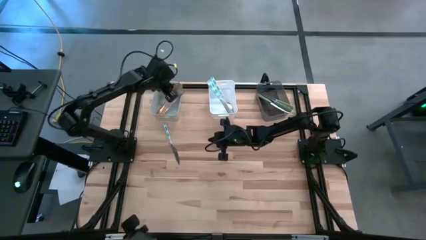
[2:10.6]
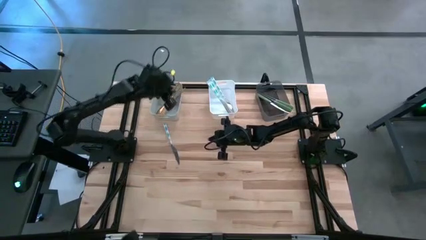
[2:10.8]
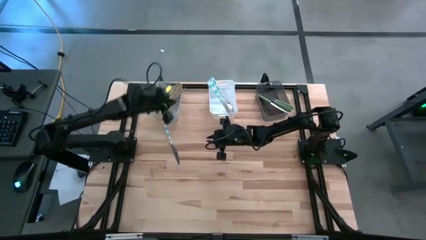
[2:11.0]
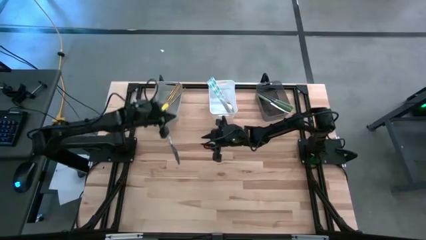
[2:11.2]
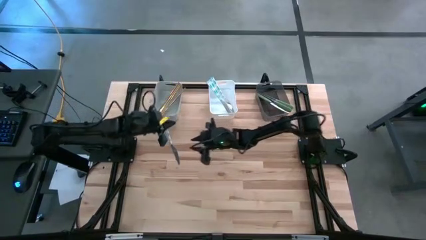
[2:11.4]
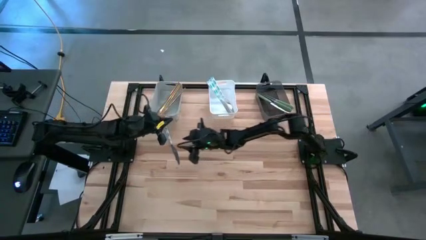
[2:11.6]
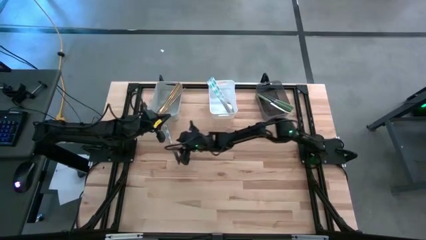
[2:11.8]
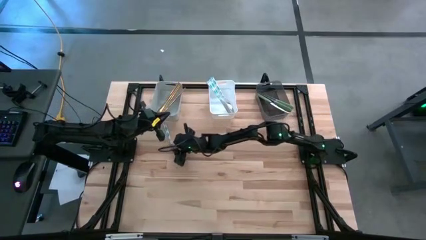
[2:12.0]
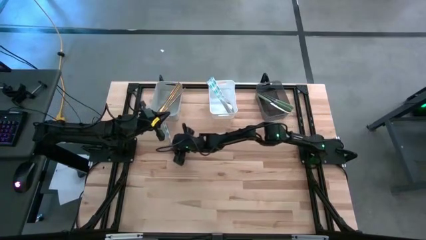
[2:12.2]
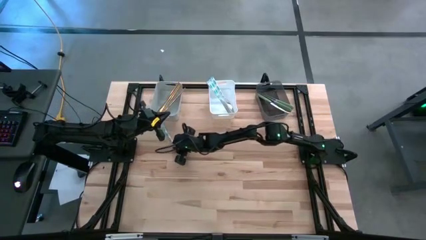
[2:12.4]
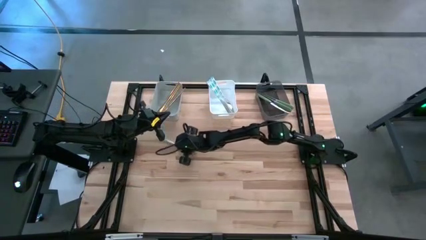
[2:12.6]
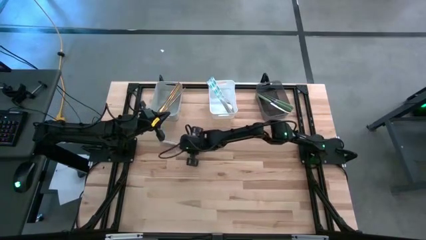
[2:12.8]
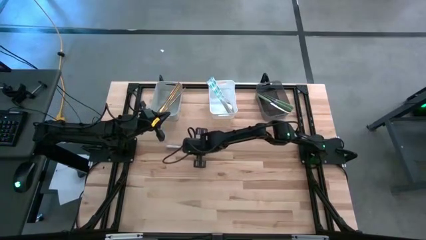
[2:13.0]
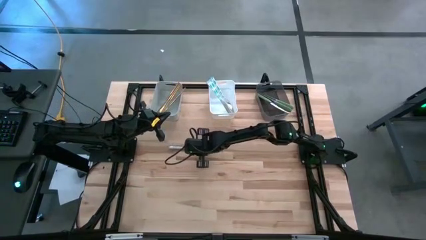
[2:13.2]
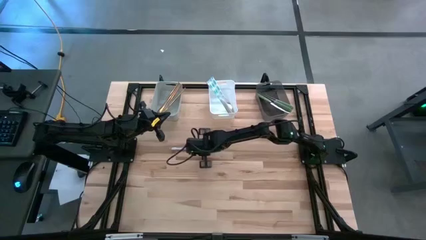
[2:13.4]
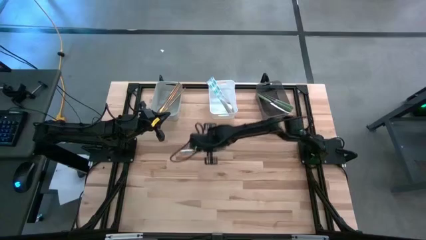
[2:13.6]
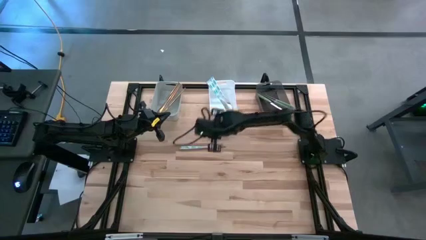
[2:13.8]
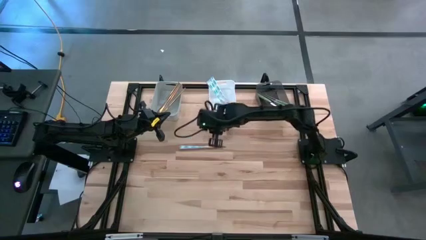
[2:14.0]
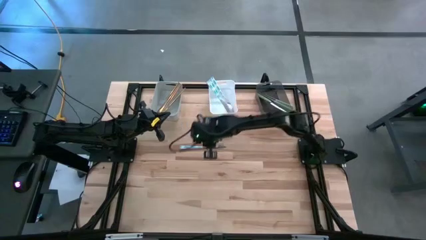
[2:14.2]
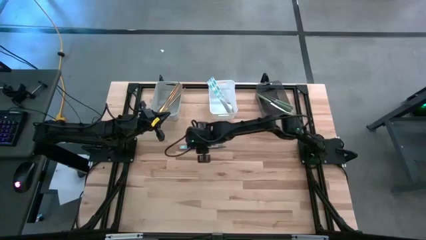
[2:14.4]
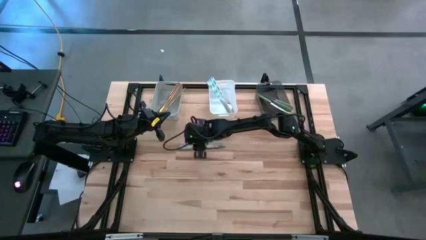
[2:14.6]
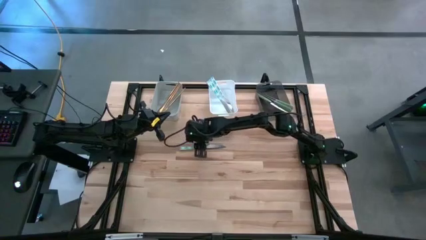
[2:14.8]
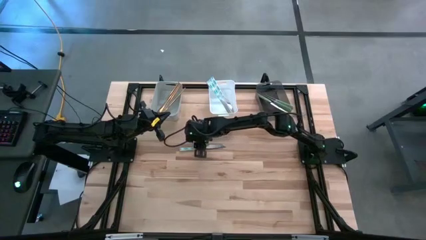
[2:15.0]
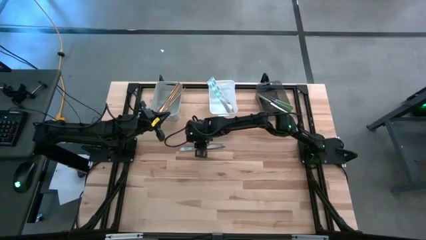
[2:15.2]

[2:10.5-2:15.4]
Task: Sort silverware by color (type)
Put the blue table knife into the white bin

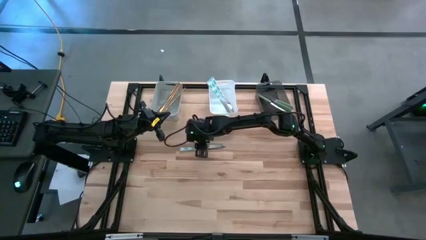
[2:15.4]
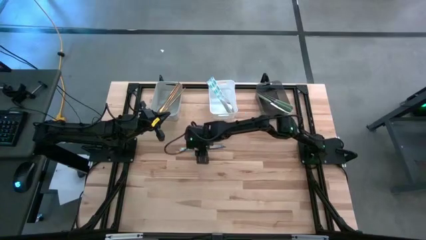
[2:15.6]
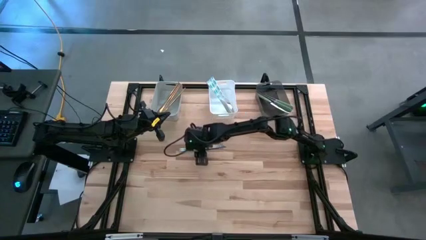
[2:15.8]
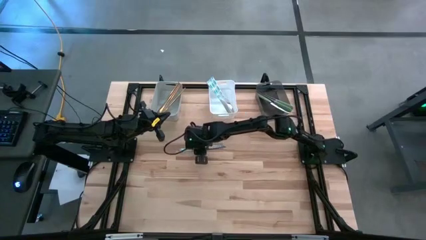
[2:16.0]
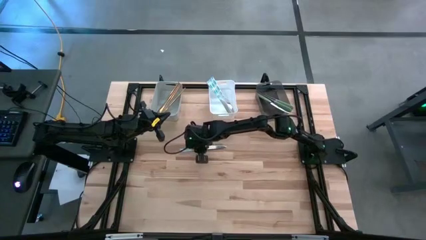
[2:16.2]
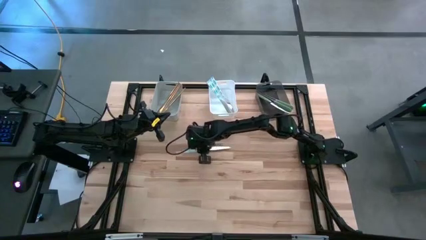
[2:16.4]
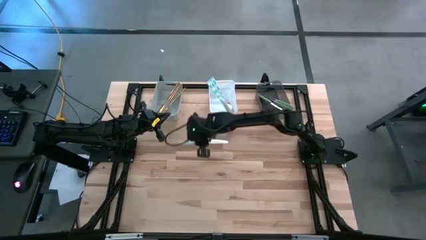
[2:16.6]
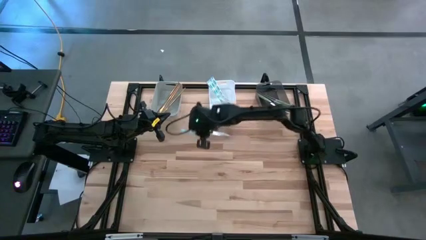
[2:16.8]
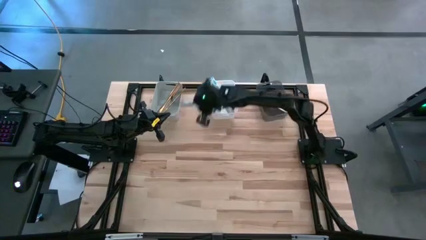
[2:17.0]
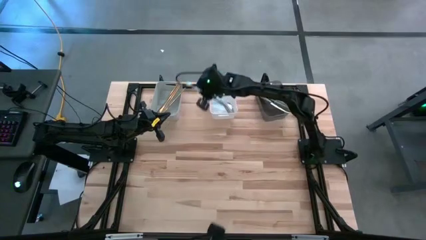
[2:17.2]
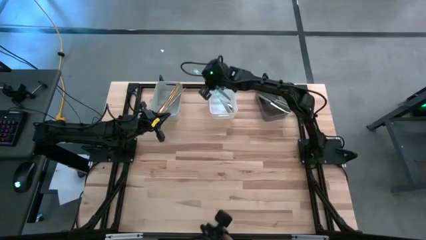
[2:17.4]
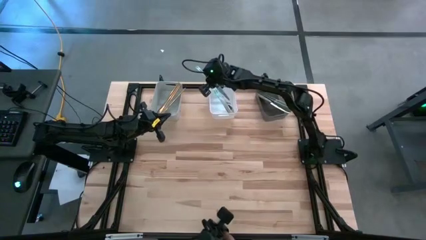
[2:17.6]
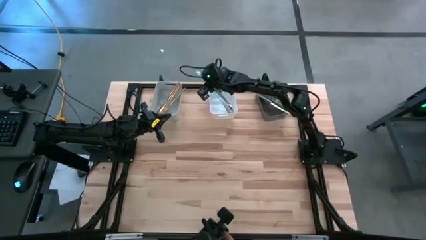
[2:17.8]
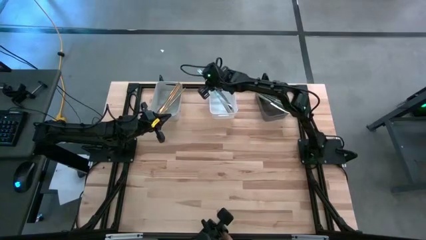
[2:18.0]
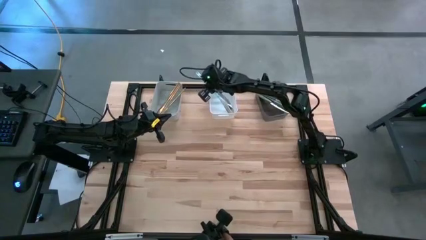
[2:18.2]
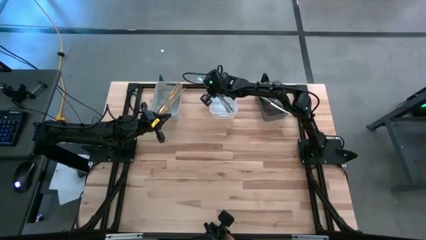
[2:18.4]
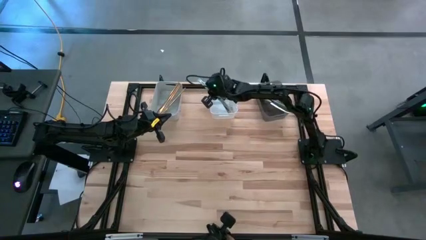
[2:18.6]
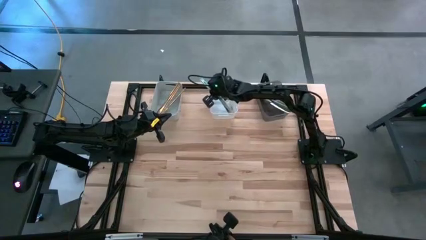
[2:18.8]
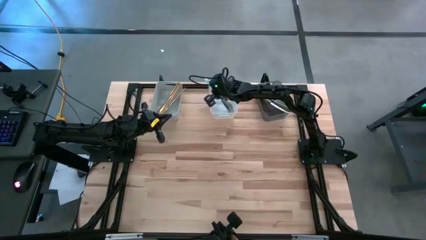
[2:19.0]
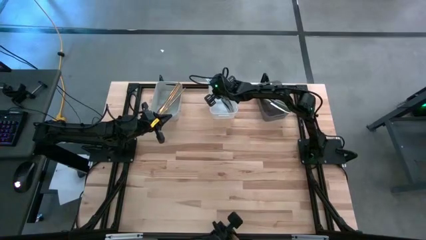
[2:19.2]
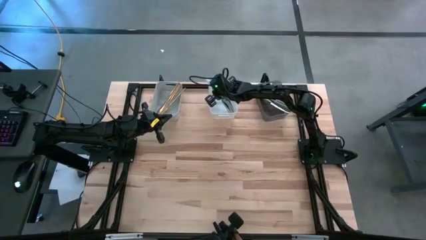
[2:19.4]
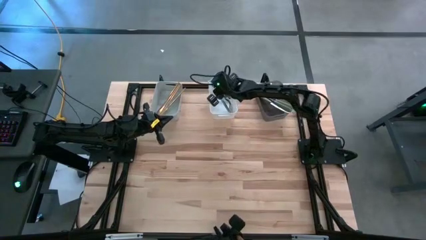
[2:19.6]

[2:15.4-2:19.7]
Put the blue table knife into the white bin

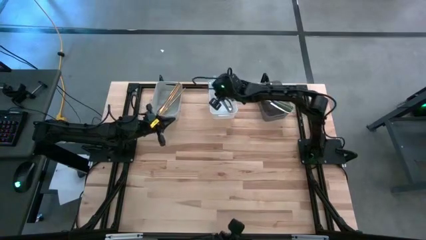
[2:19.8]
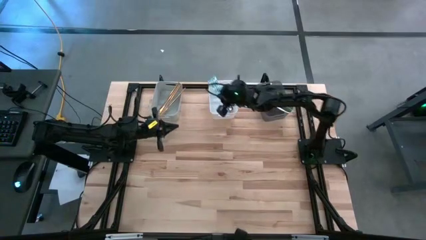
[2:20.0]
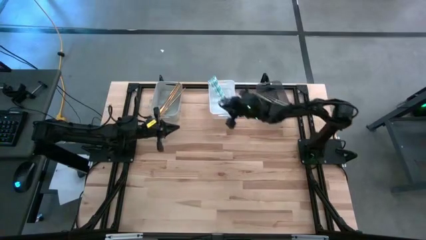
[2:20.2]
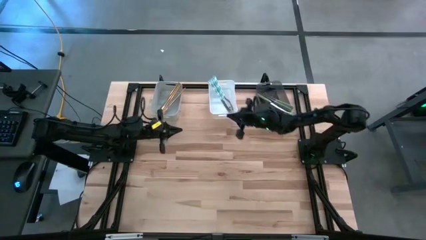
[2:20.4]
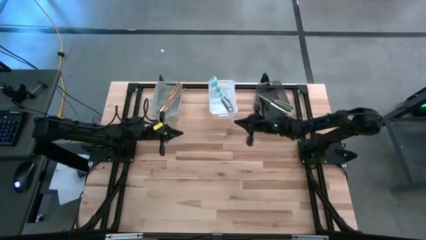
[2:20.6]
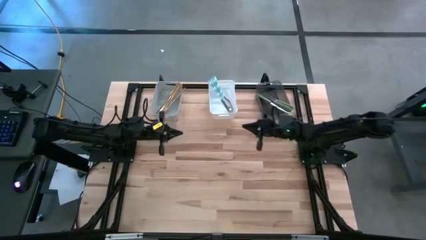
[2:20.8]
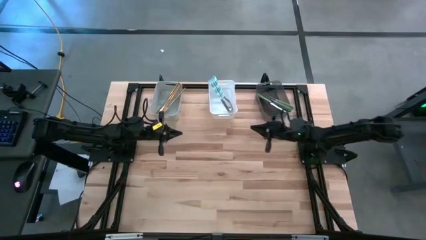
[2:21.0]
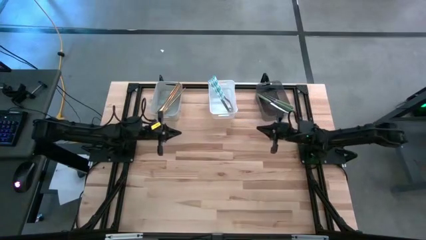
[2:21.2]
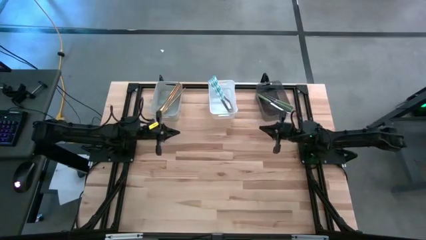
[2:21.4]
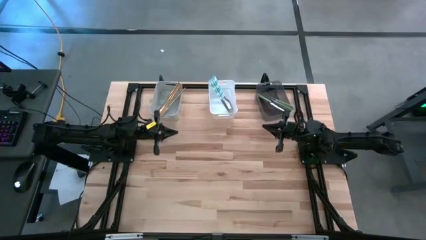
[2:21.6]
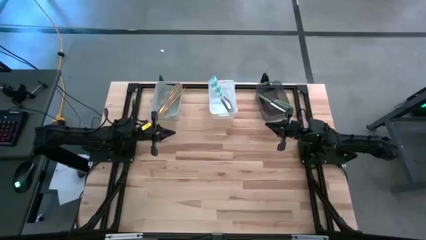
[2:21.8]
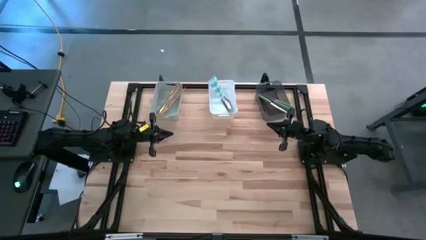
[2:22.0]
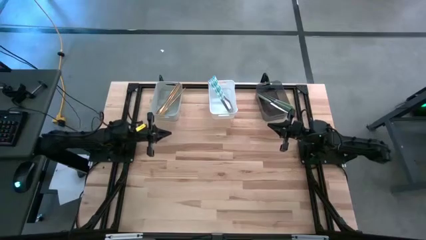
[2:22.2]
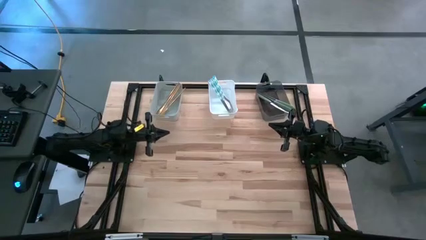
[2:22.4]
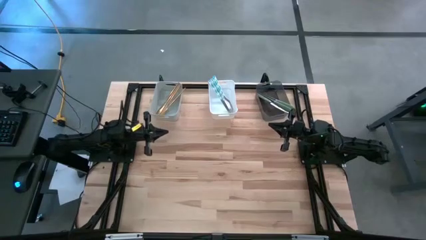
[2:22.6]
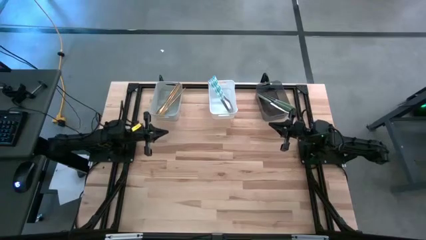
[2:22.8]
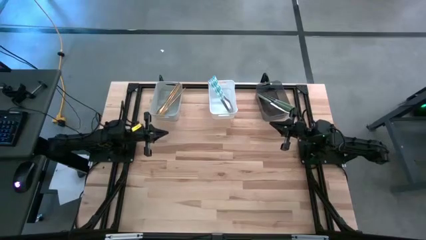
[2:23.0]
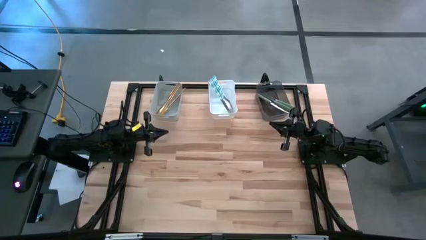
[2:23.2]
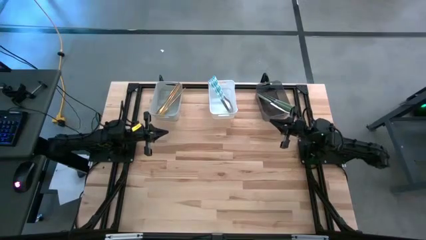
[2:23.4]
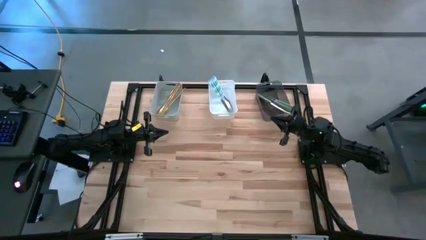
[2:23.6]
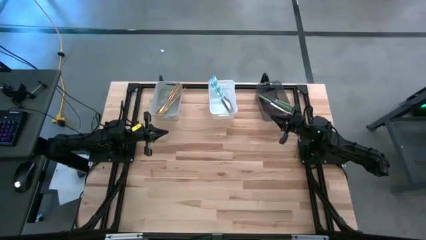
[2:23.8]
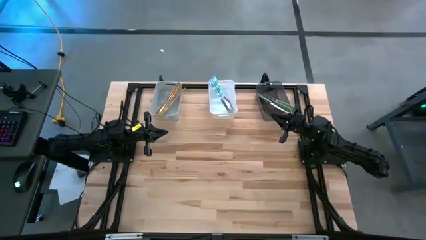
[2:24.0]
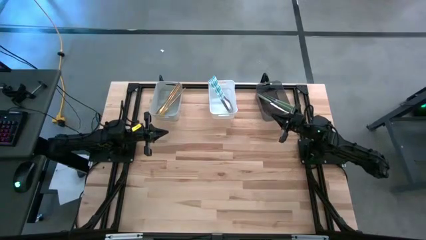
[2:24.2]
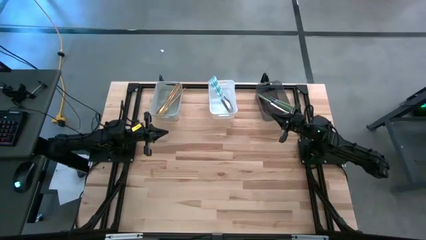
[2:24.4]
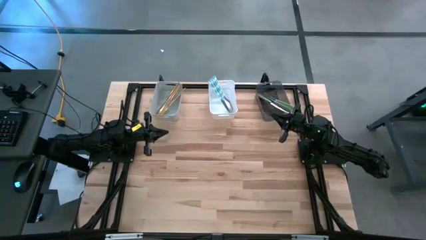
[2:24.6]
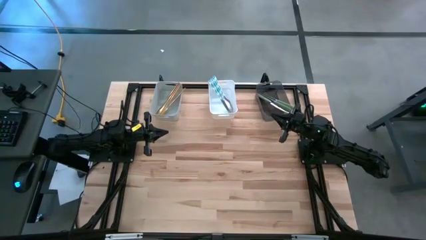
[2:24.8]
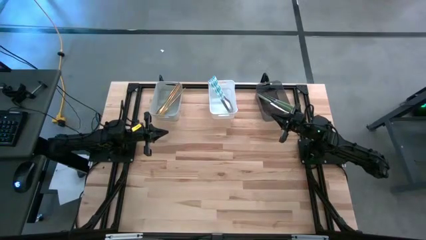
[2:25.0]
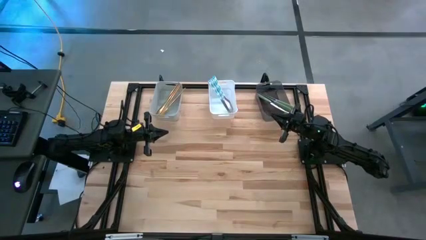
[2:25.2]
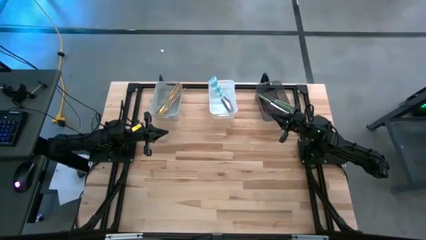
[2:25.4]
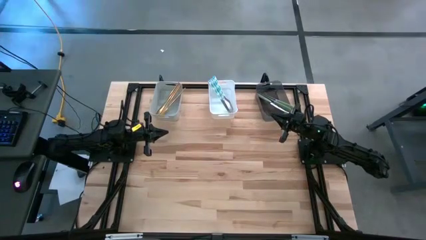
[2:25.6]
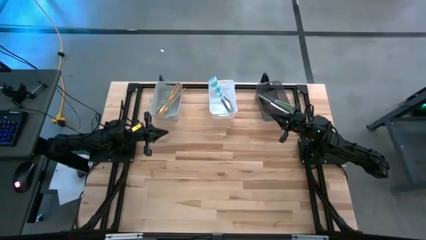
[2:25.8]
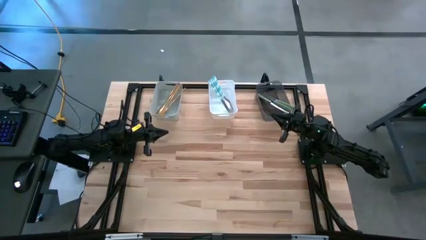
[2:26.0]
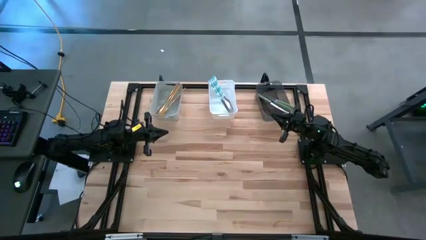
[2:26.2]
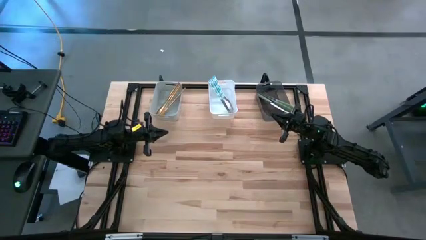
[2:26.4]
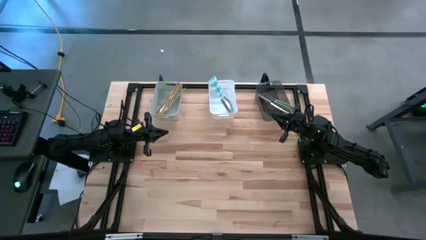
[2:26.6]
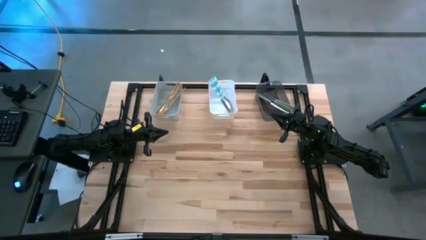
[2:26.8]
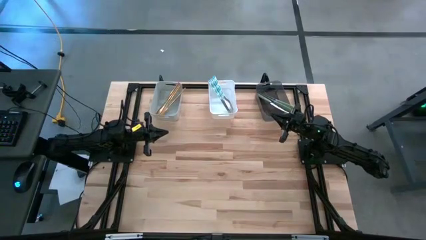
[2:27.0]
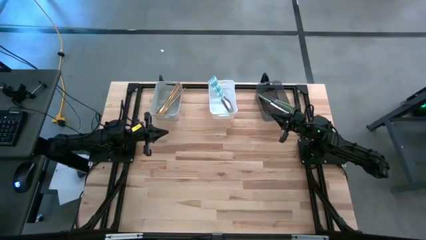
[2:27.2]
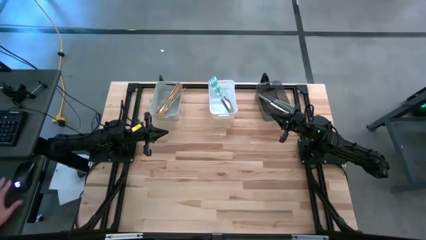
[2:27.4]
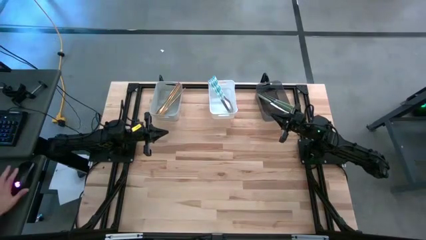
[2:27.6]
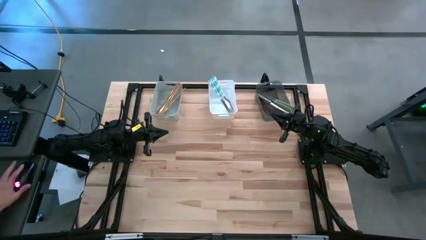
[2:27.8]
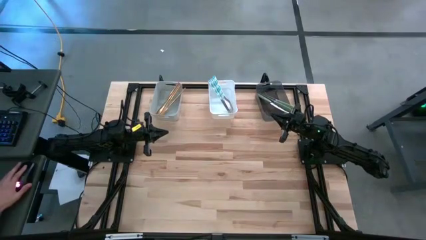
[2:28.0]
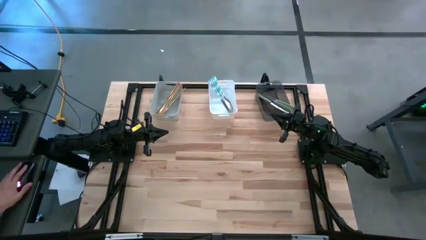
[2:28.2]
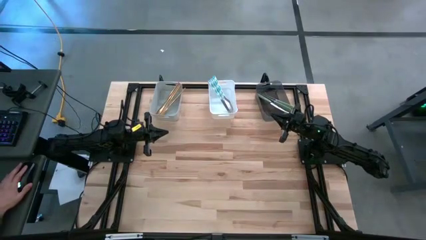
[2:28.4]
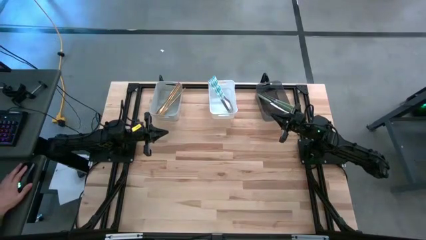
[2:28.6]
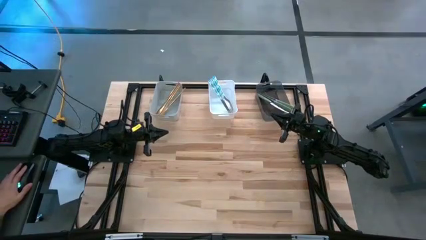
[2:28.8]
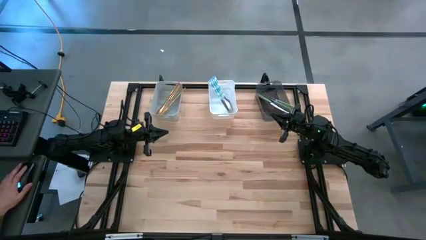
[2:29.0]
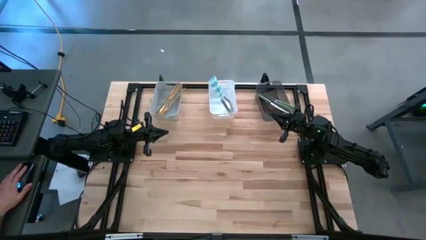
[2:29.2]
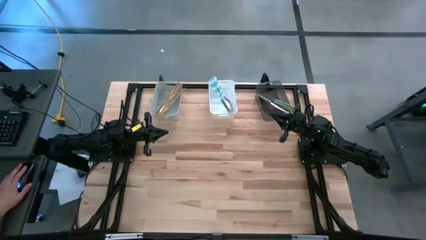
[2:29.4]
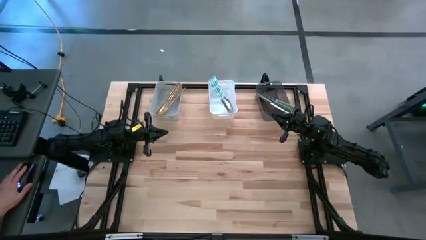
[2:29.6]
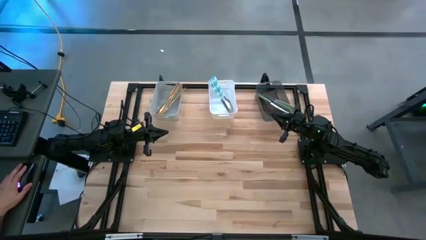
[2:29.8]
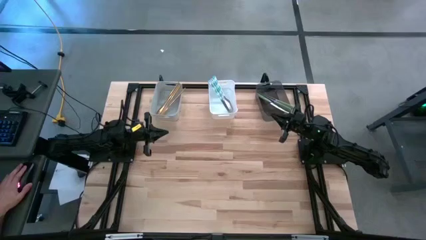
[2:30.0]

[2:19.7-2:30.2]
Return to Home Position
